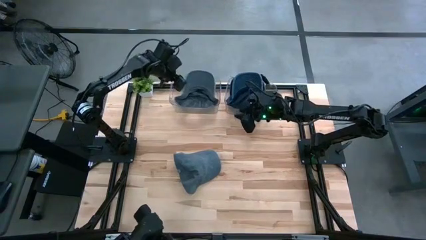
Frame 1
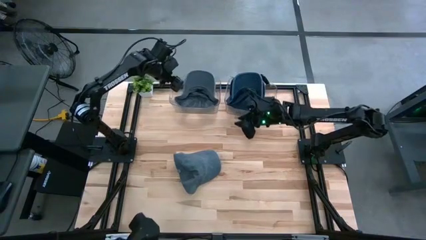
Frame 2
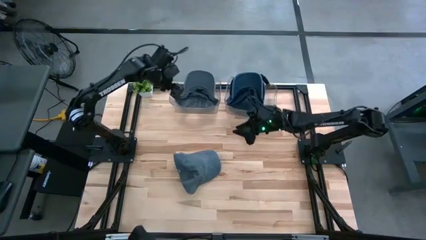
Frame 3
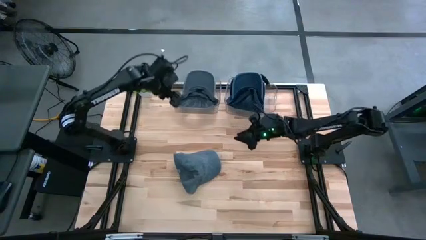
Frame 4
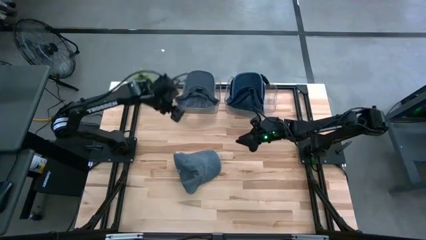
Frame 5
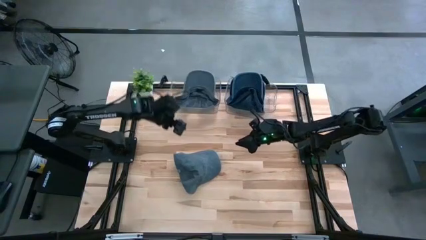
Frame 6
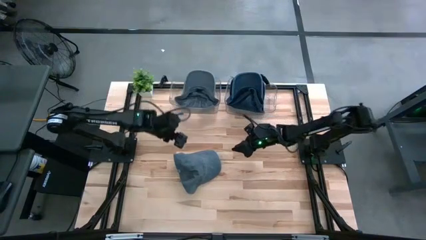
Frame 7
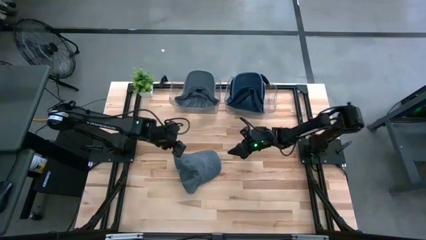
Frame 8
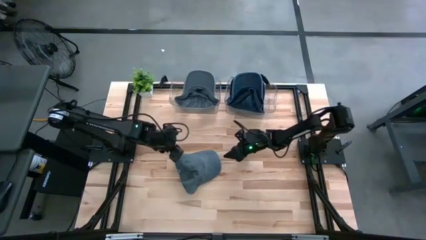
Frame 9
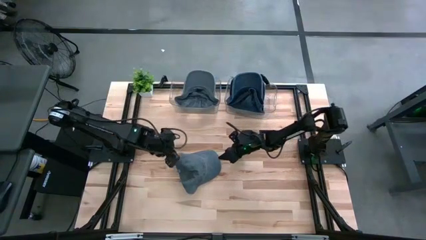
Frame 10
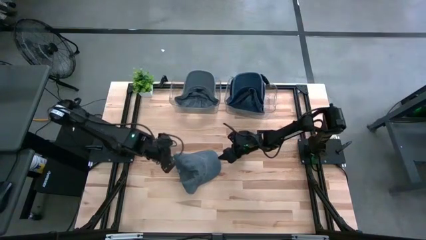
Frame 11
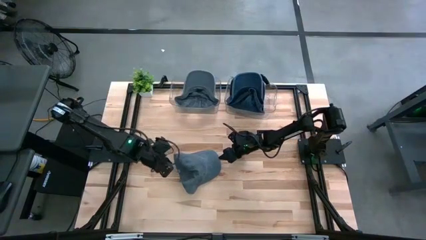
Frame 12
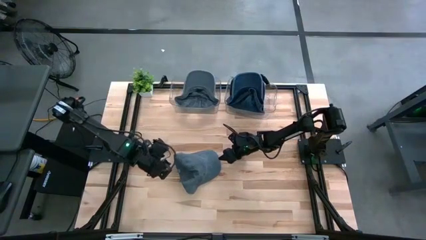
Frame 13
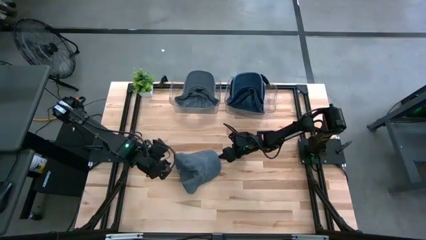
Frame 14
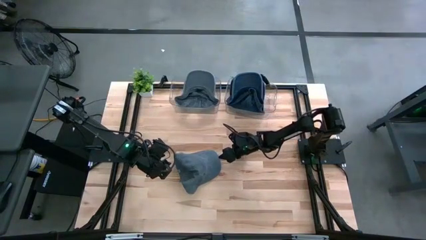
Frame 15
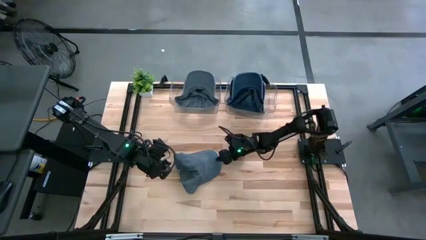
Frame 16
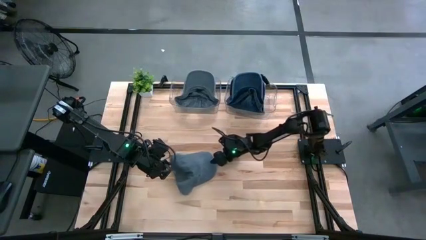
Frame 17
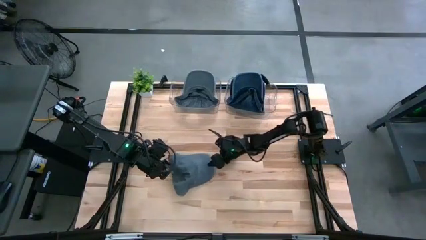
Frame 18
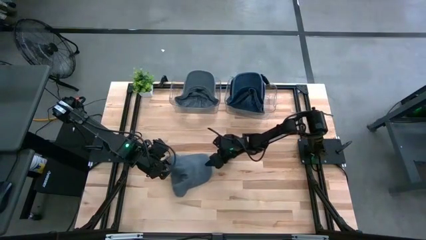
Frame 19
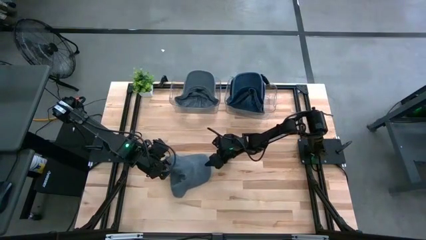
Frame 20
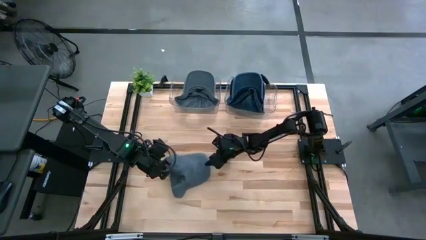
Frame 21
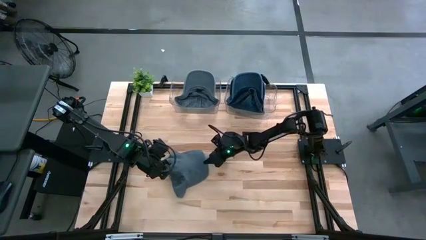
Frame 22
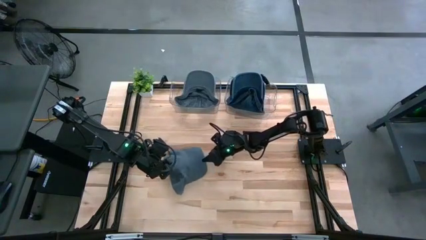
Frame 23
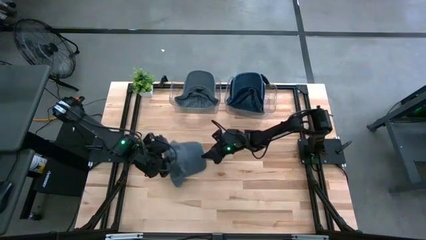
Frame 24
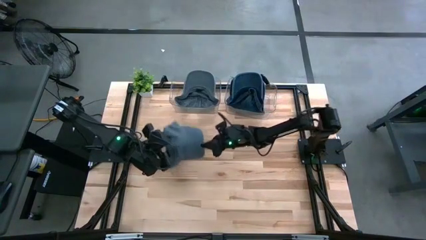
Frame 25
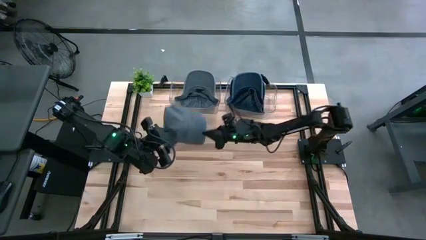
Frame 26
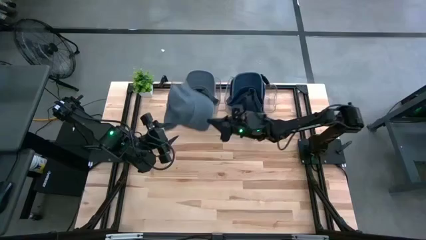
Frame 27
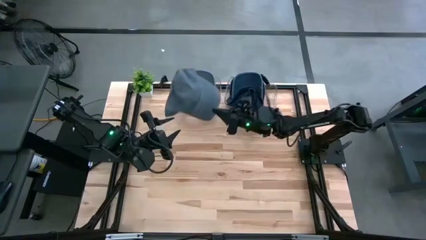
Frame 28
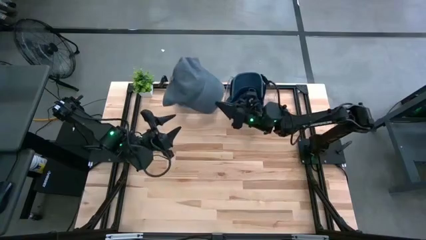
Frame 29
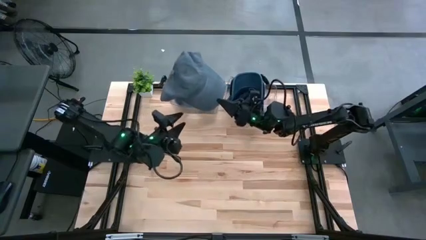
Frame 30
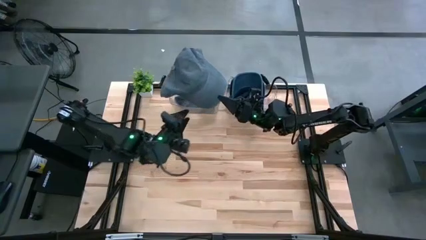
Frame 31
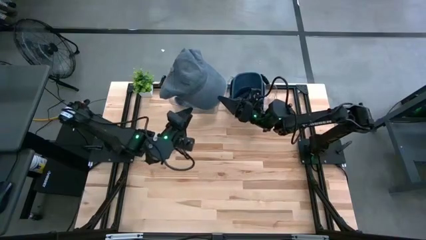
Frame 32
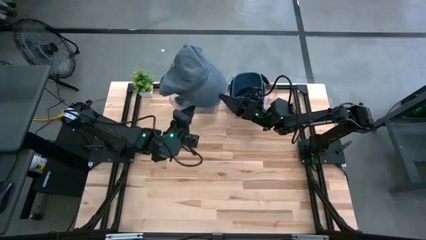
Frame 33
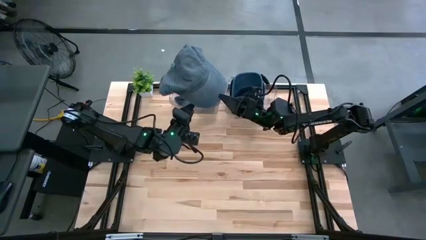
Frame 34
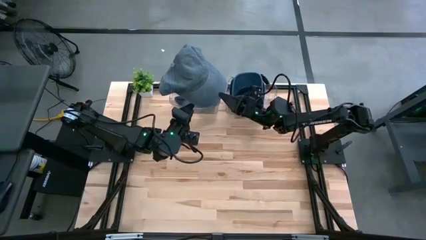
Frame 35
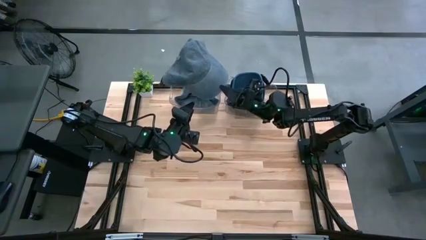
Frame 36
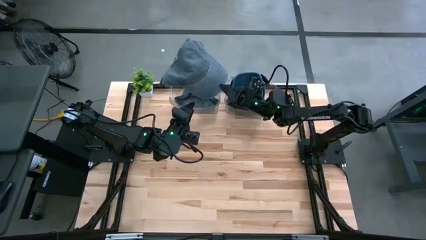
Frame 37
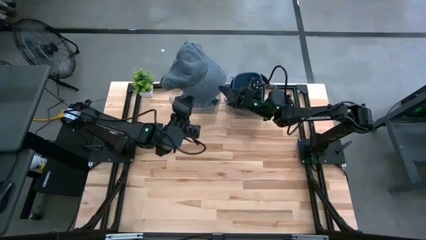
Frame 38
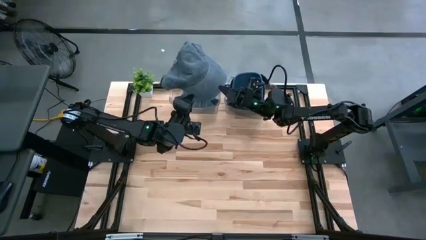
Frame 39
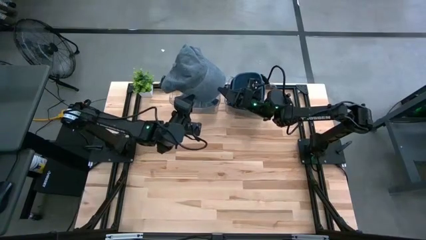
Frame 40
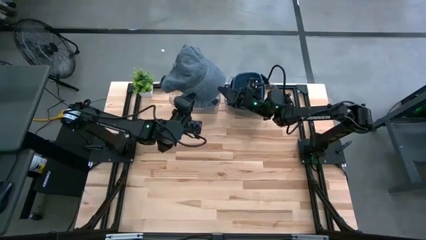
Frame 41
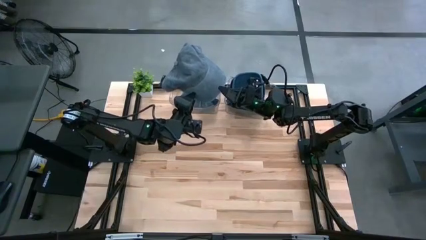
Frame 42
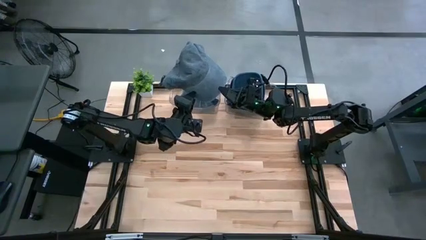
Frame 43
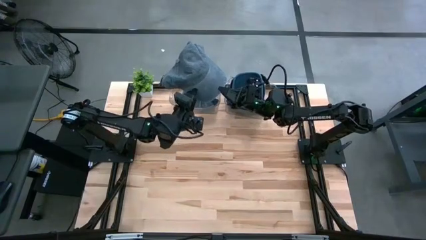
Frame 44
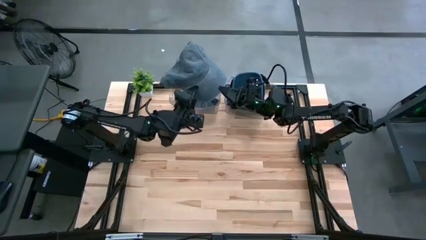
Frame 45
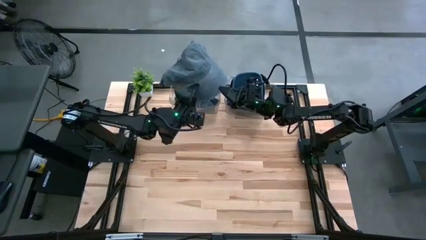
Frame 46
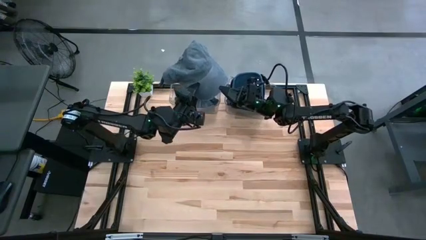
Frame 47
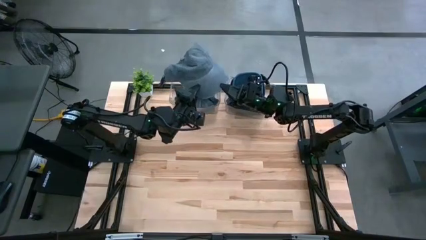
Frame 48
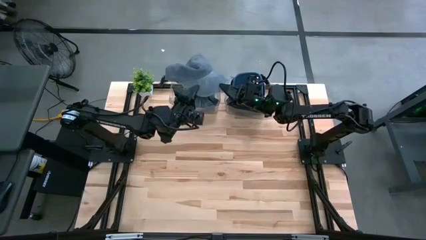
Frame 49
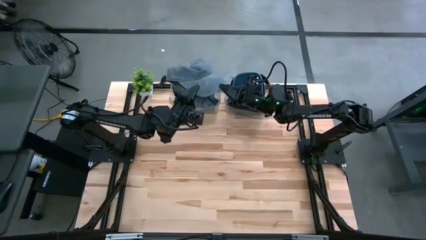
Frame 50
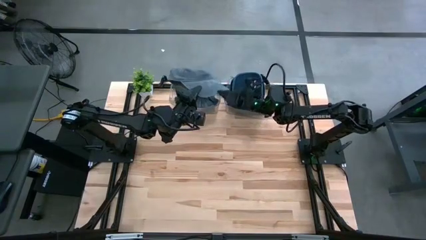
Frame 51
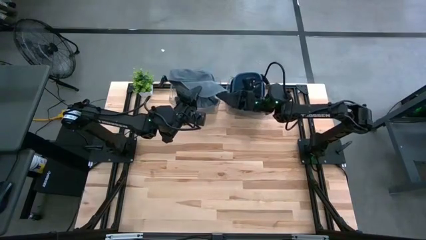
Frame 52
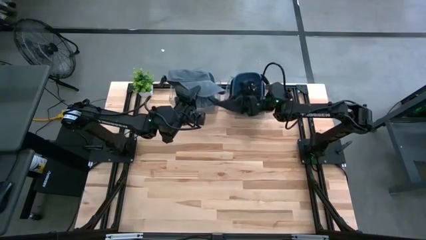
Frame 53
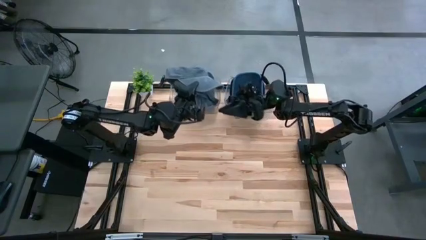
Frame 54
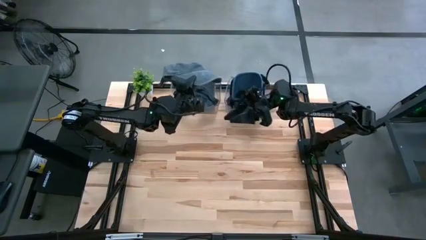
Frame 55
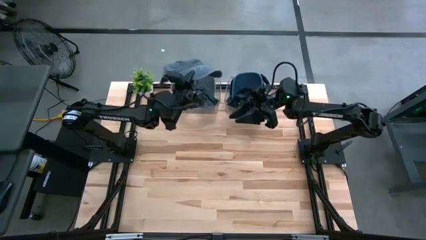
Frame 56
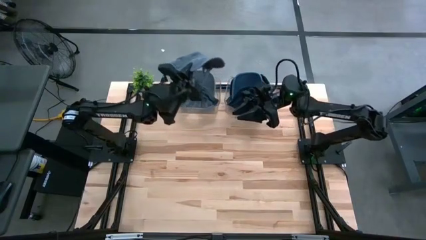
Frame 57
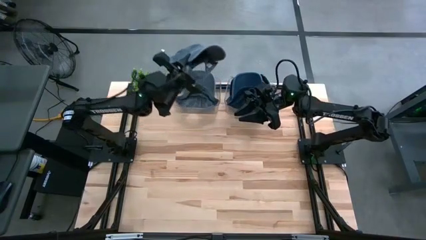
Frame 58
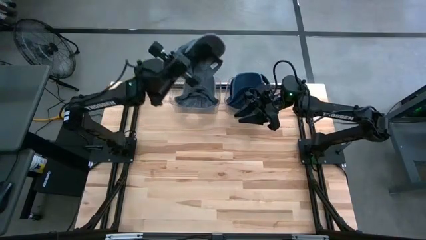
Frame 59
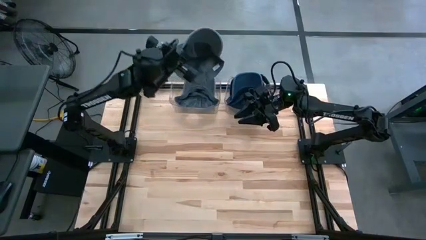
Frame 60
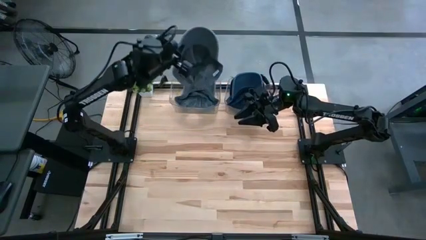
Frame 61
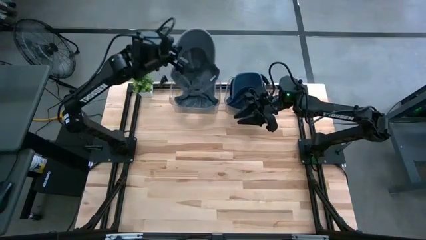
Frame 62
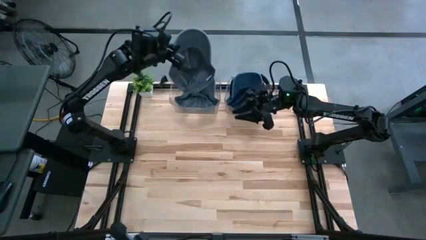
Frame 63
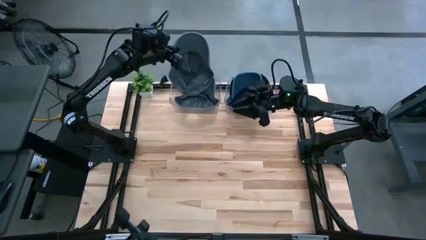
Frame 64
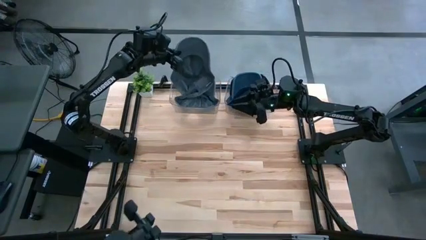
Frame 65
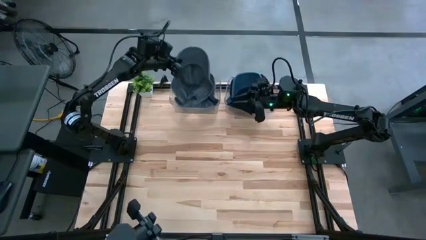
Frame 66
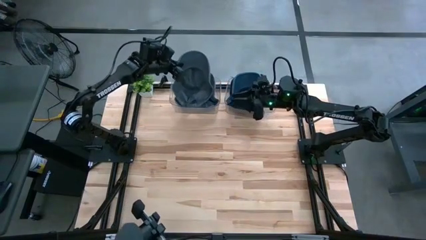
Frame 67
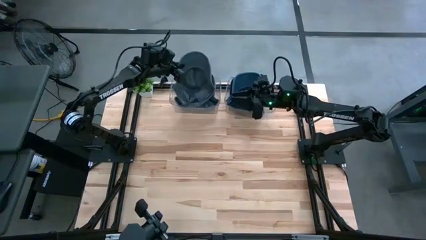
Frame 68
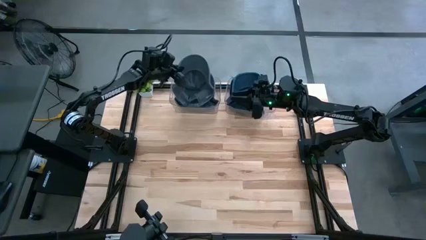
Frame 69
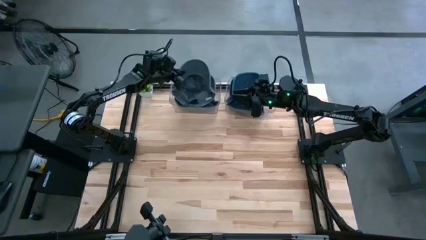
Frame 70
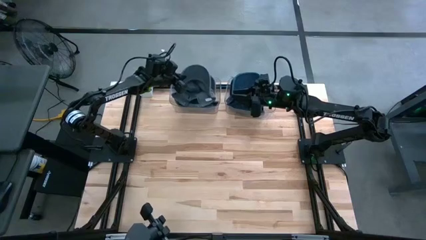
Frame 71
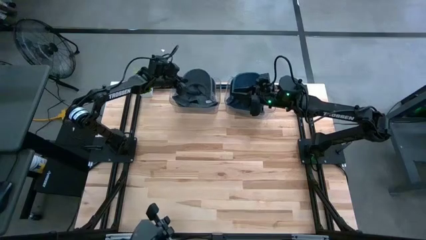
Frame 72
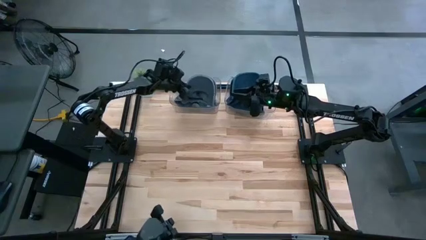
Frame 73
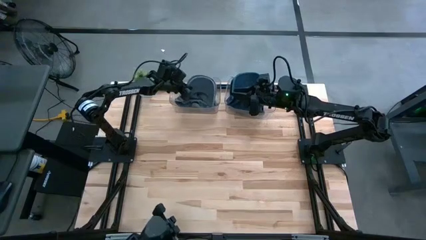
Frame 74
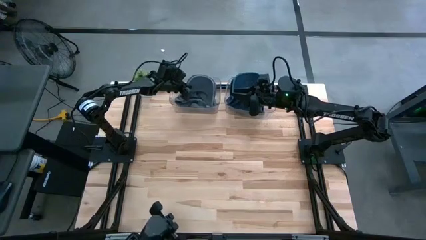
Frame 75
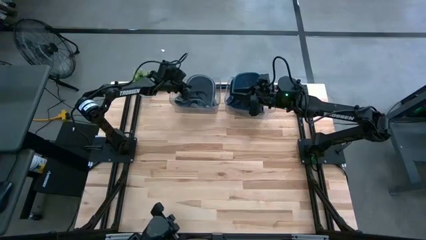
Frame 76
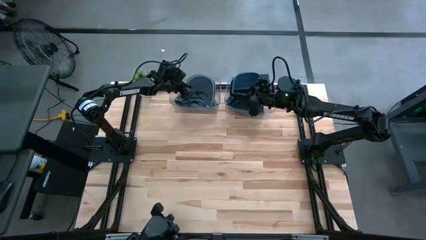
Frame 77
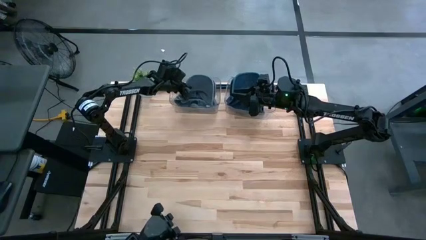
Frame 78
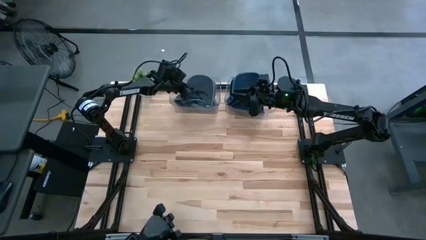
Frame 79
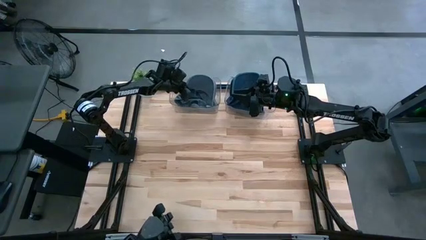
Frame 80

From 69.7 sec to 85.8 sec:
Task: Pick & Place hat
Put the gray cap into the left transparent bin
